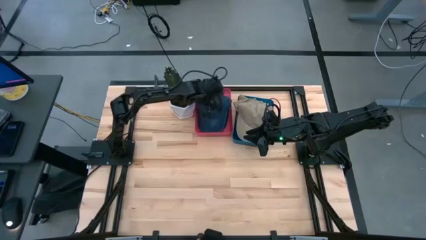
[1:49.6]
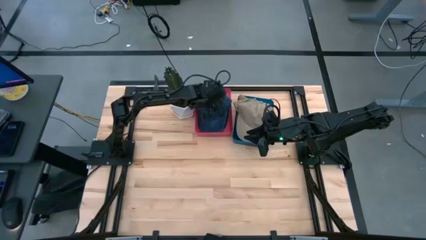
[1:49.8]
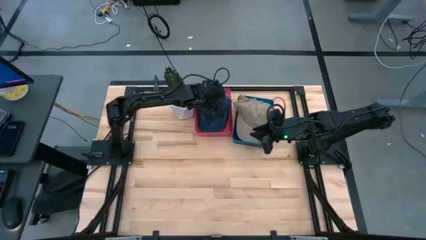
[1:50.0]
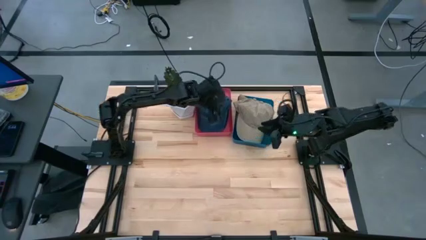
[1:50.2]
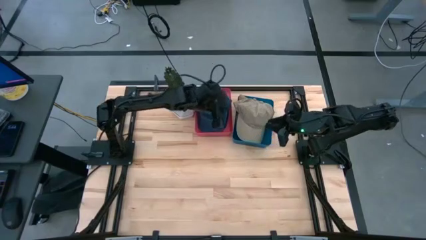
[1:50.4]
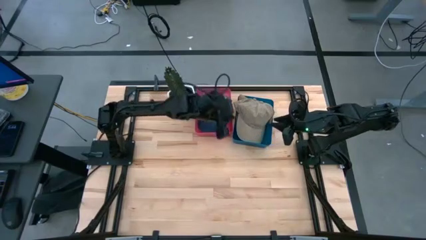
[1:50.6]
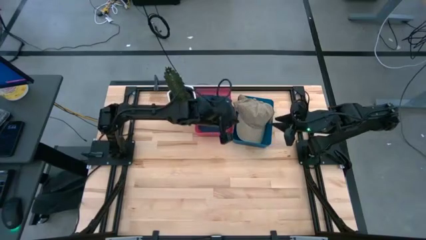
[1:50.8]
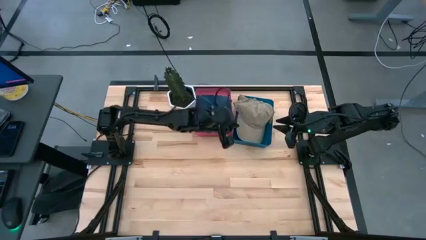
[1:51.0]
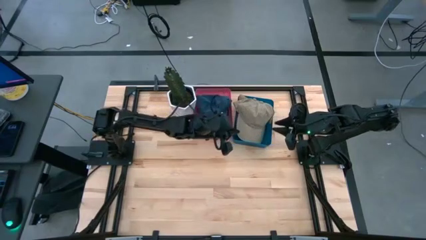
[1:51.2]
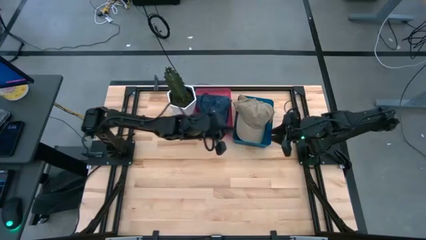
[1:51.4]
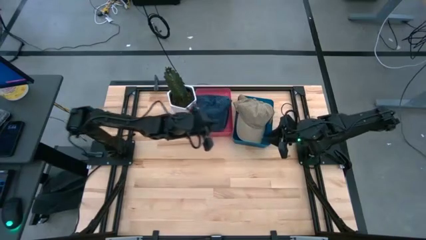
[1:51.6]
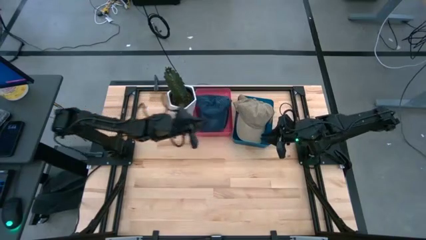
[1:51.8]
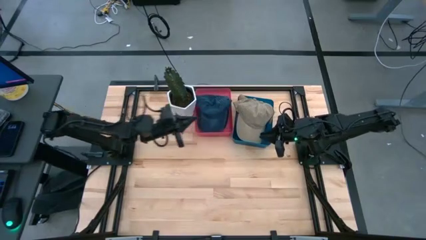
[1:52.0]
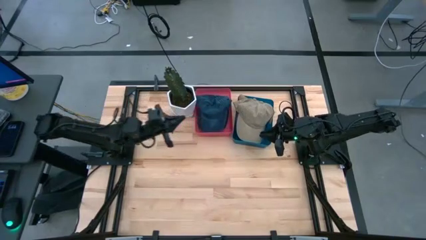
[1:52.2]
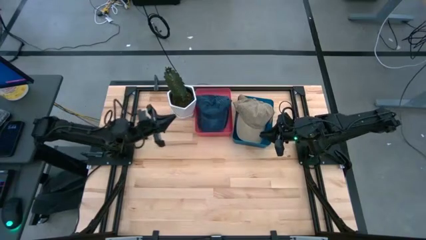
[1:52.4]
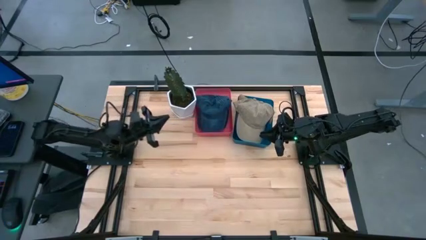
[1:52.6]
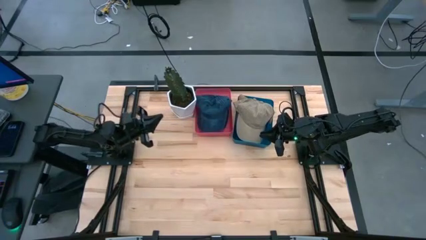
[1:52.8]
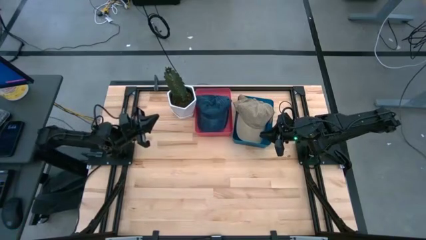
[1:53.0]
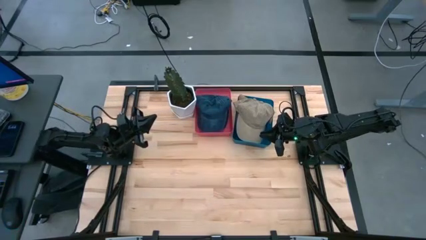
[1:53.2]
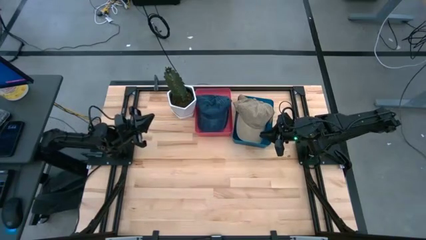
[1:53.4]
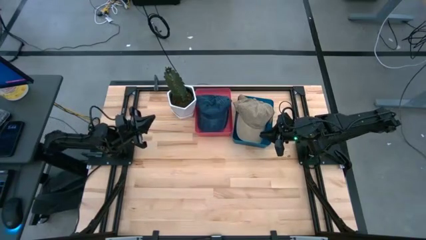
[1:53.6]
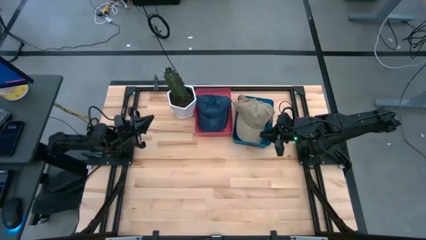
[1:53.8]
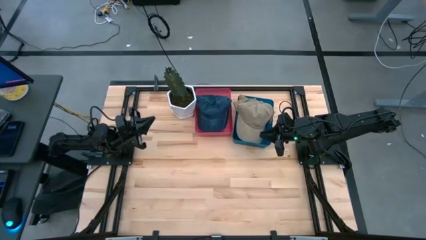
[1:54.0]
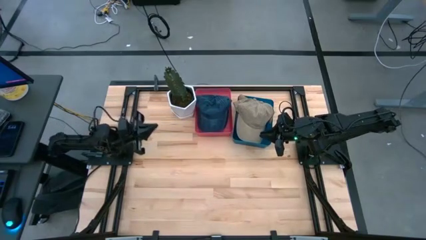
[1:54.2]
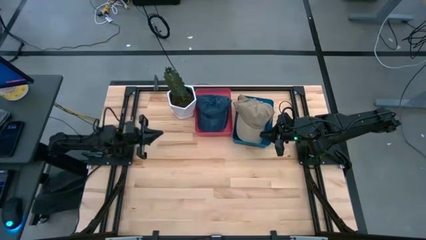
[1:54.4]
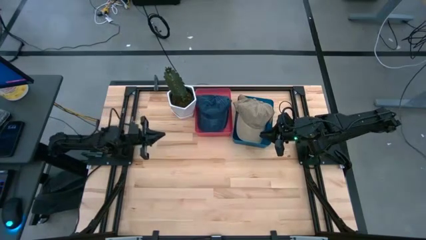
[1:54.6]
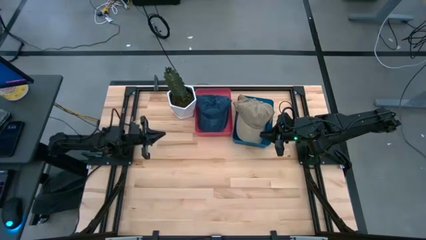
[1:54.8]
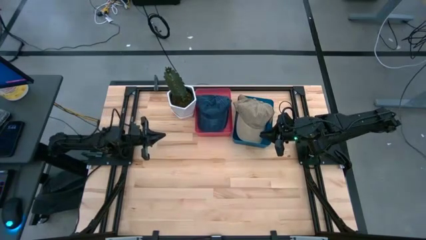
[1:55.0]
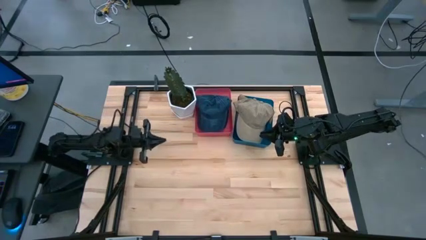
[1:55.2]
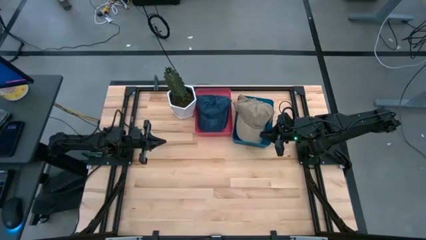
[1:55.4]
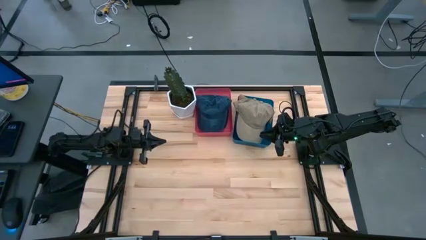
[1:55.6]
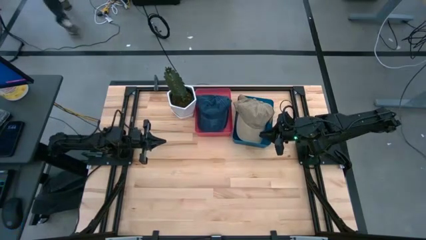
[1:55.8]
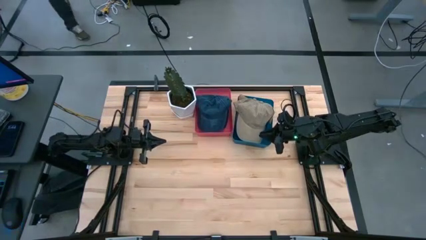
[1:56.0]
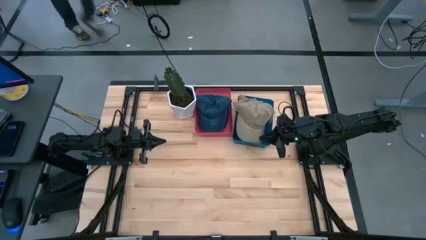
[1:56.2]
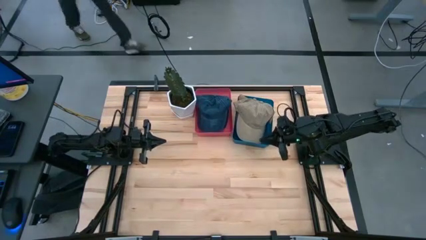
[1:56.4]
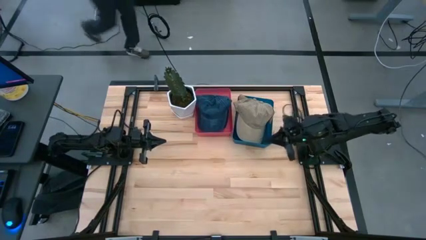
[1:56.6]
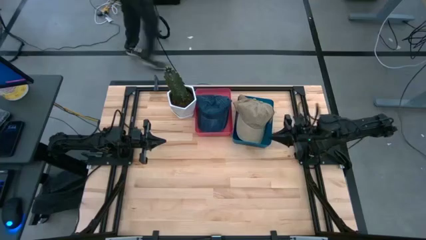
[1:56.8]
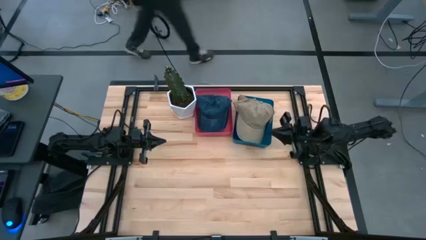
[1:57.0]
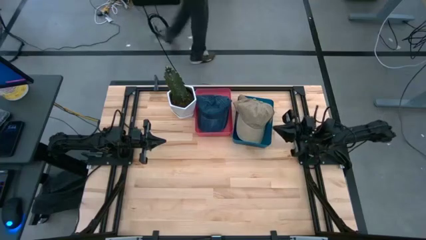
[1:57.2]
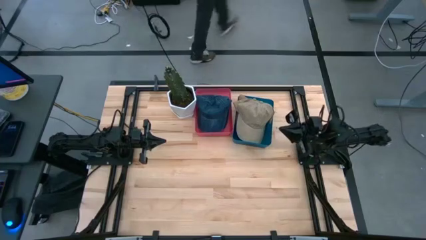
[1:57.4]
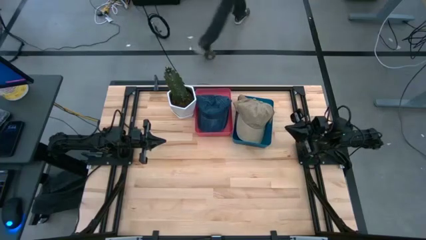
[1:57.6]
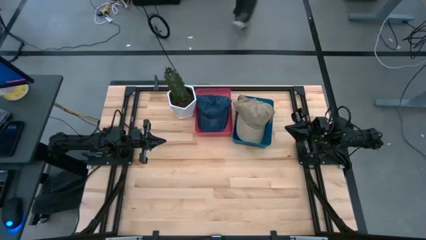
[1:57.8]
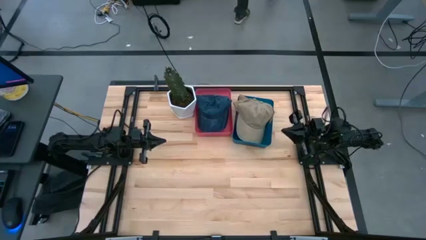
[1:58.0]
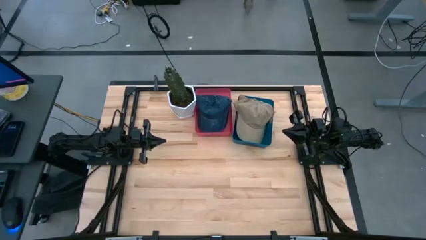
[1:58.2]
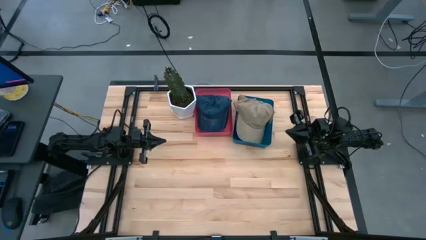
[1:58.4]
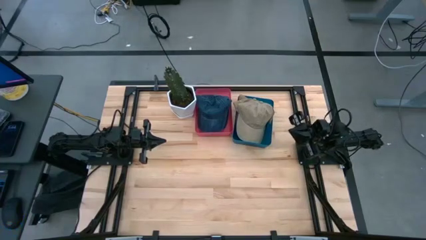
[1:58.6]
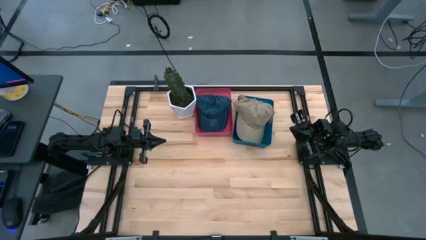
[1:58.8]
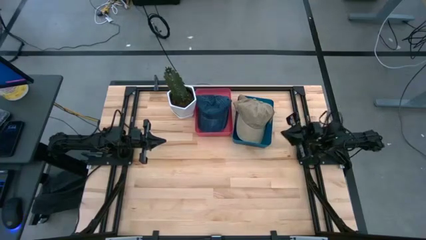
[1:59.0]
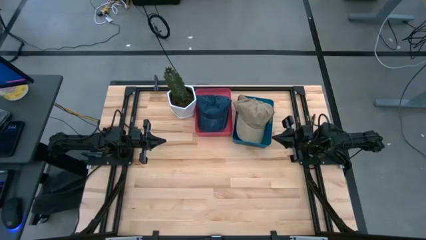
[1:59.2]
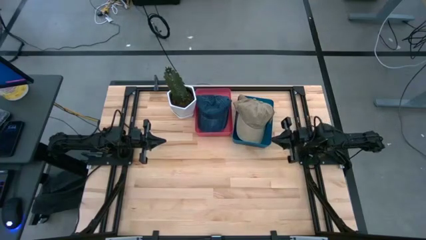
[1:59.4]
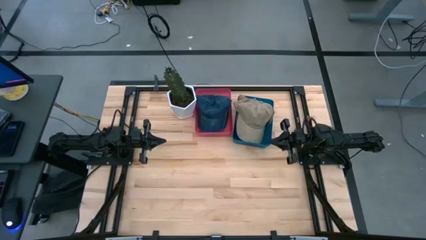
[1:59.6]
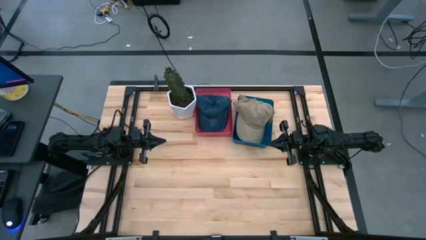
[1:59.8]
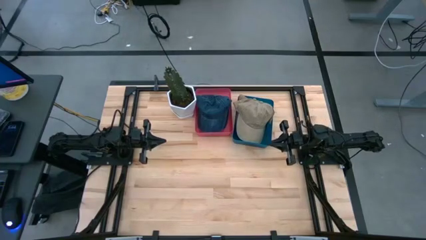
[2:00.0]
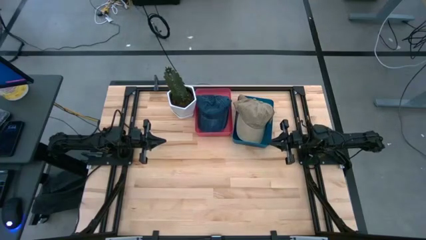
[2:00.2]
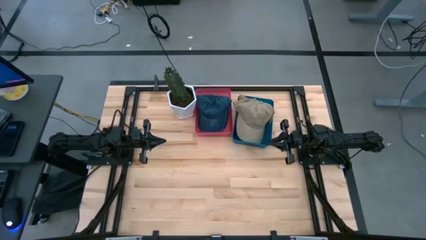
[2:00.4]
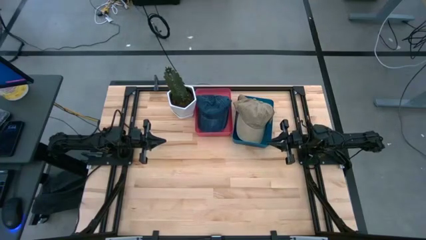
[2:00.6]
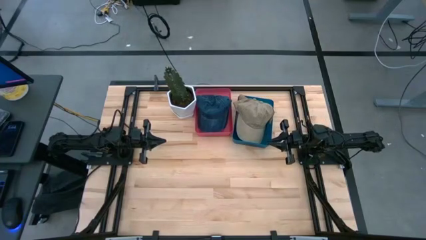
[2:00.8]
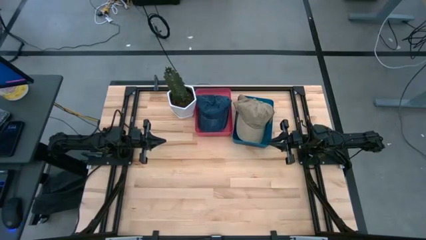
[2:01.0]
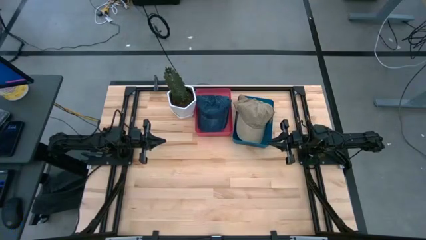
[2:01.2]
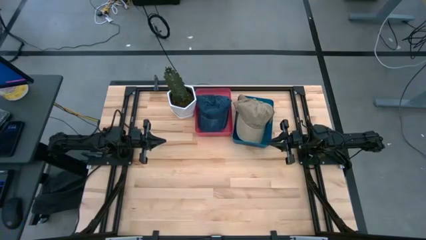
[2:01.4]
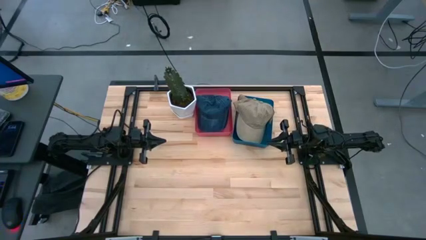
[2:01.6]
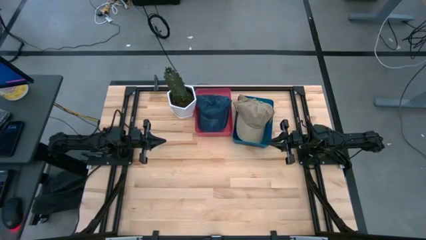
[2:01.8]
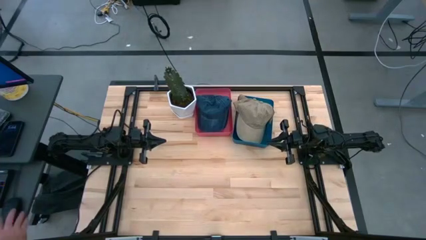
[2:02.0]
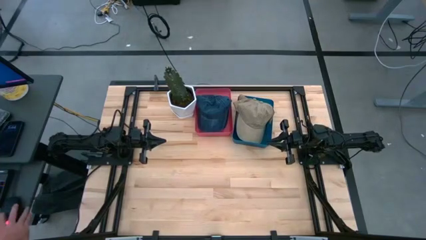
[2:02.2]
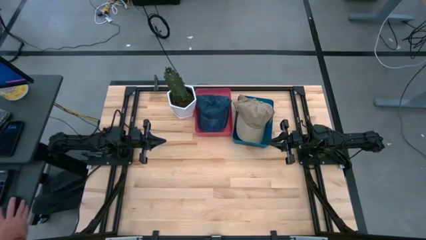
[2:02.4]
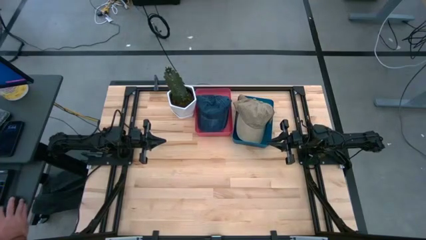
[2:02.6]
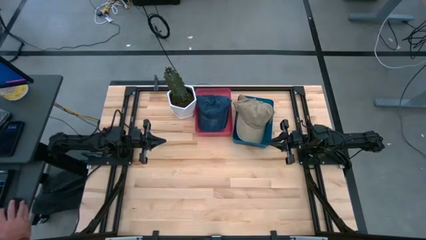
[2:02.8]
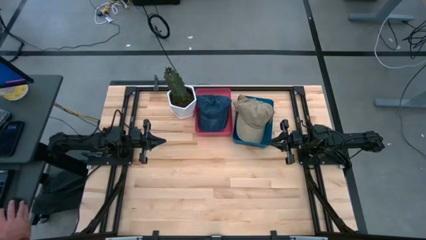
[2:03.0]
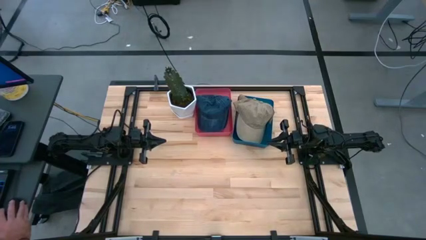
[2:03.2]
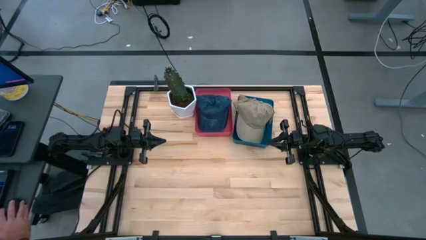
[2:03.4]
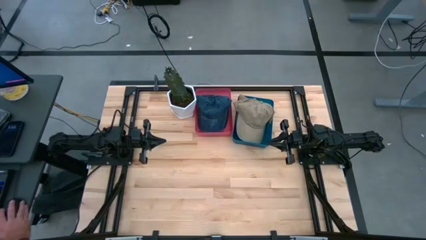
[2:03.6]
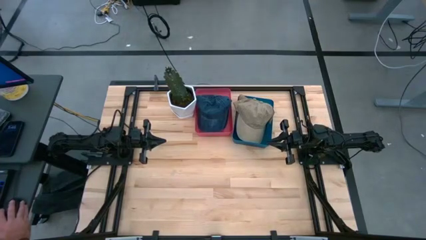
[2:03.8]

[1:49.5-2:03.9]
Task: Pick & Place hat
Return to home position

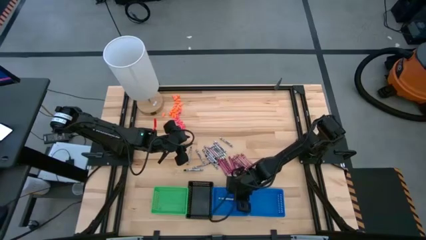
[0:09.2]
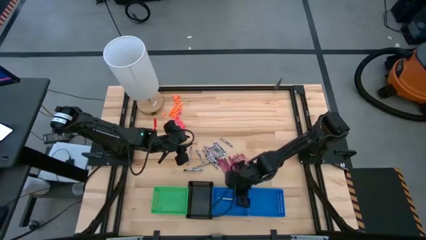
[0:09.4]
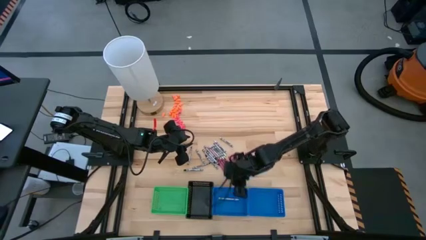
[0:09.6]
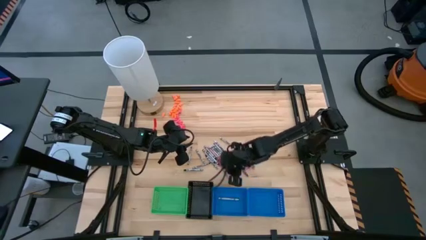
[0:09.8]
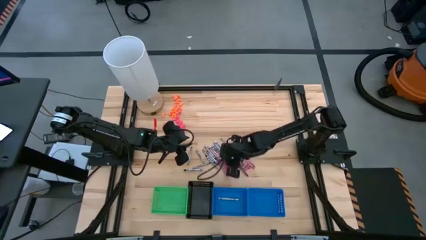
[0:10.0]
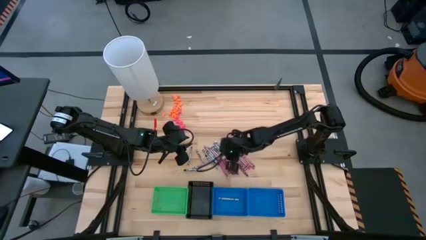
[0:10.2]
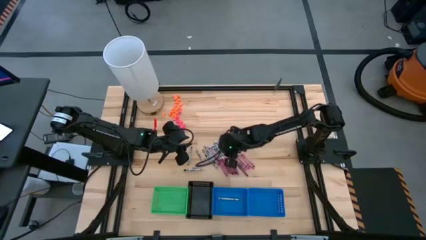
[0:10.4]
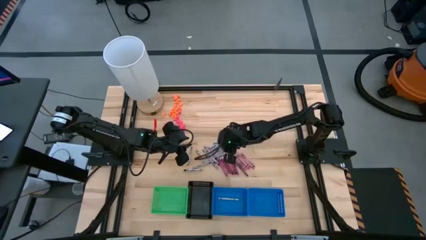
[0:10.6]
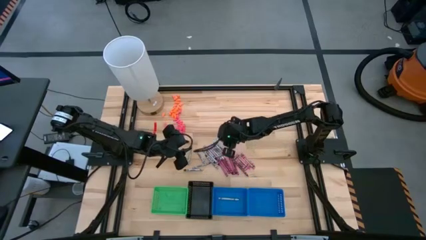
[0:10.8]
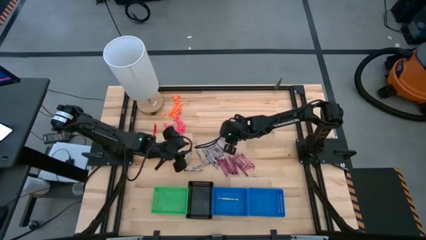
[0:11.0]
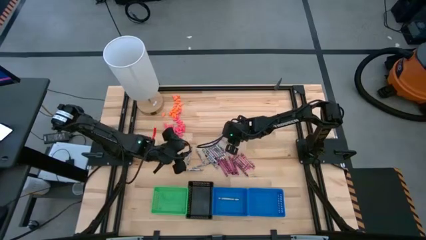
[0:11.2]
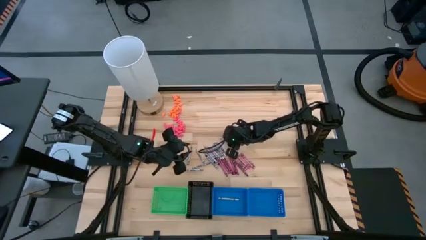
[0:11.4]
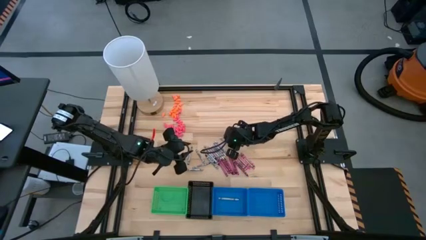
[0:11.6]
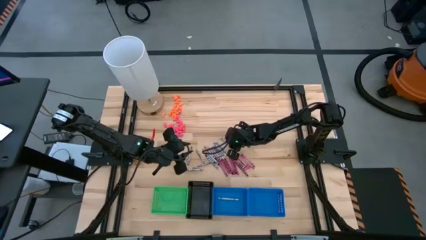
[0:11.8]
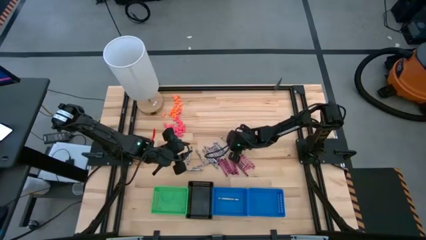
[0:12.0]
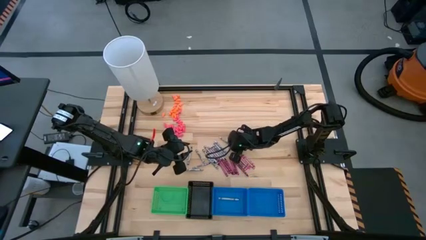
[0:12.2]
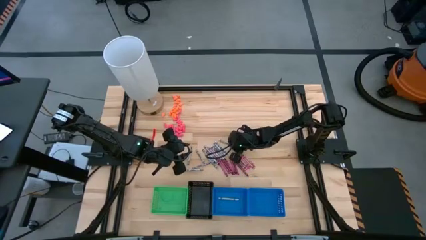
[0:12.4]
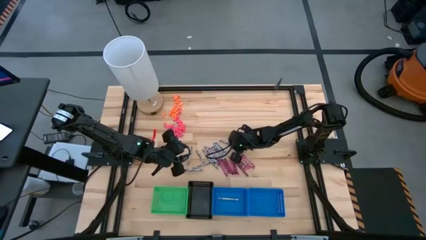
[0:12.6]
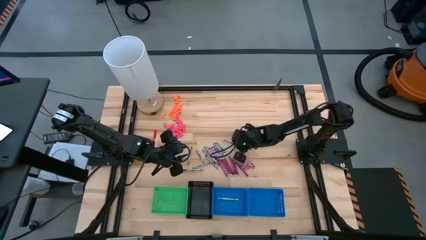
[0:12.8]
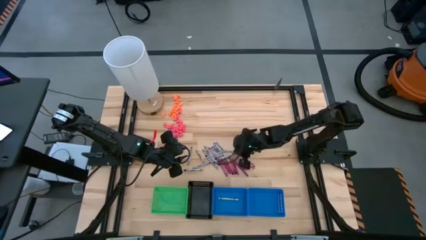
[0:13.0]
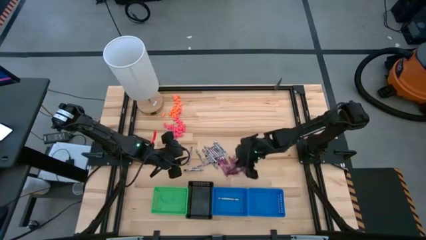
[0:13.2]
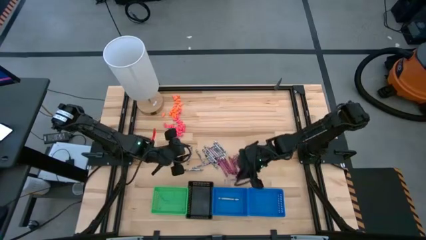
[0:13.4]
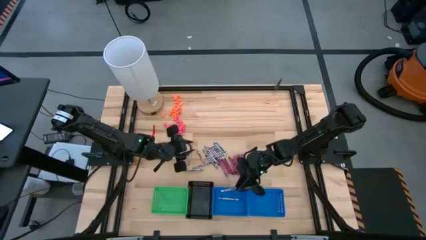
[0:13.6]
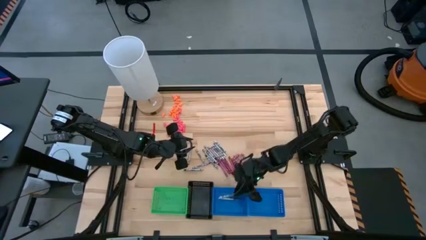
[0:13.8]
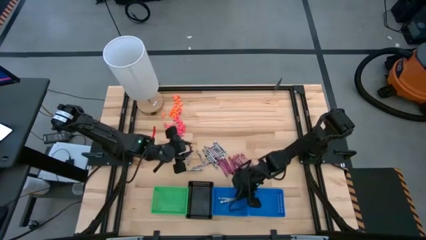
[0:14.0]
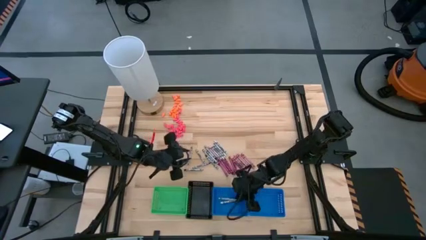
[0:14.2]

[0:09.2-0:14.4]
Task: Sort crayons
Put the white crayon into the left blue bin
